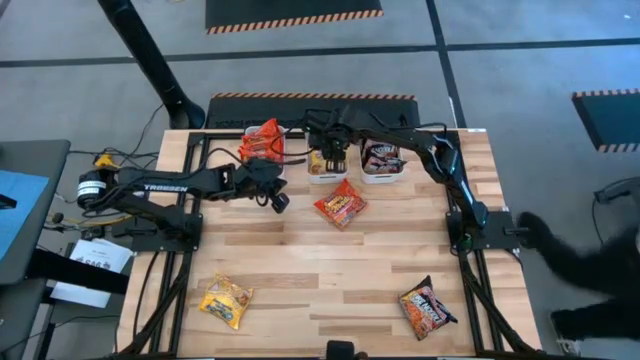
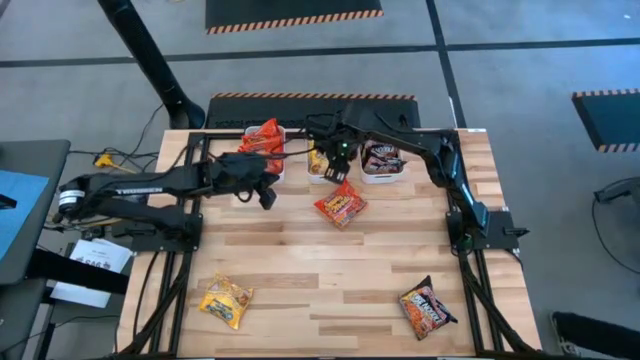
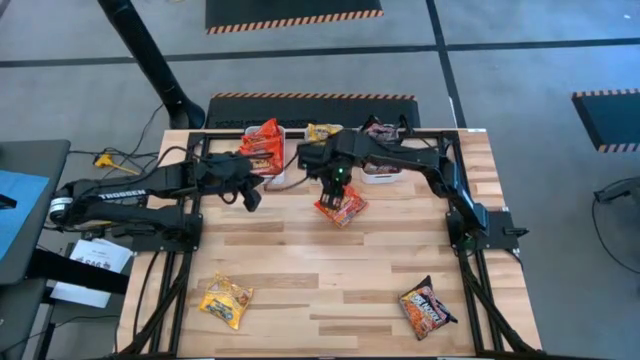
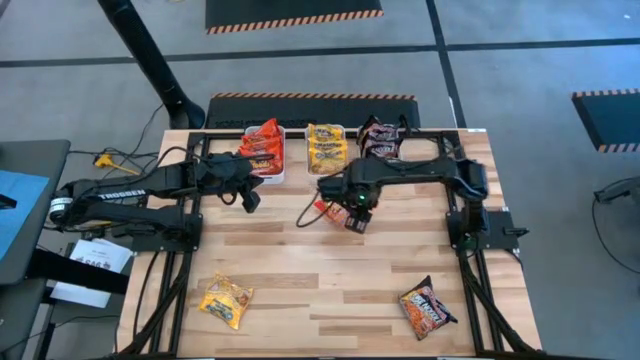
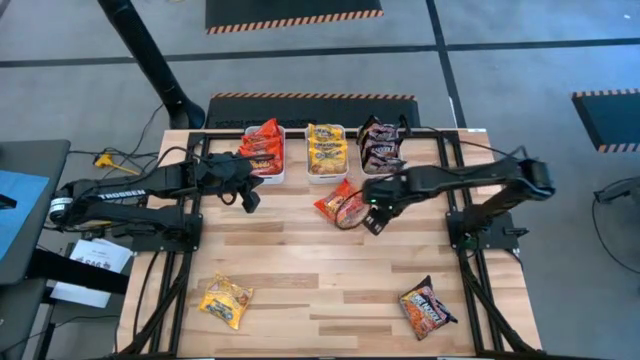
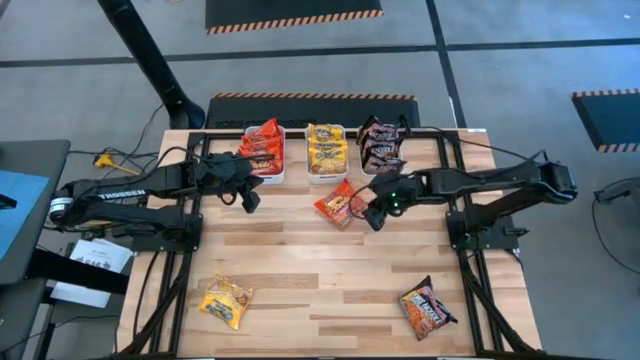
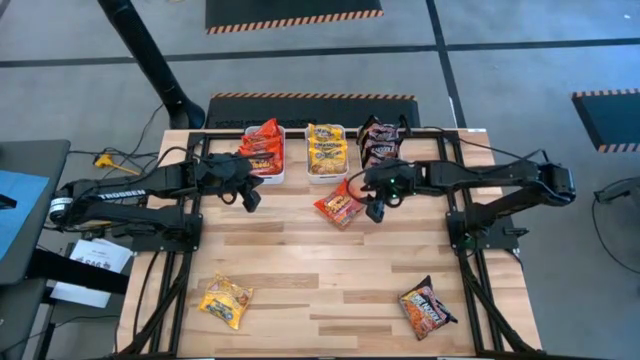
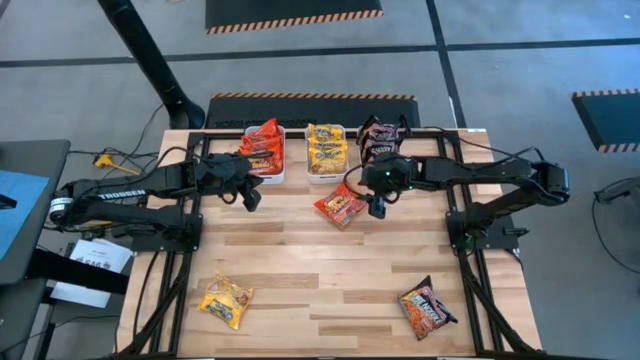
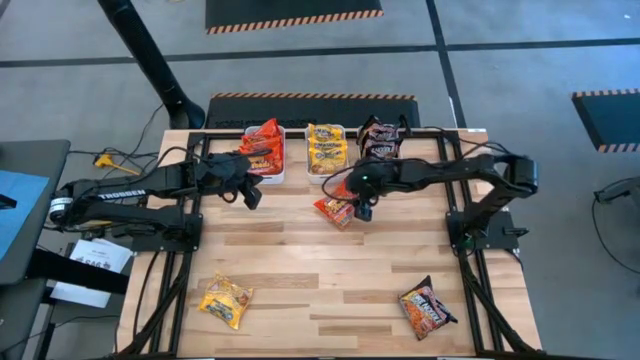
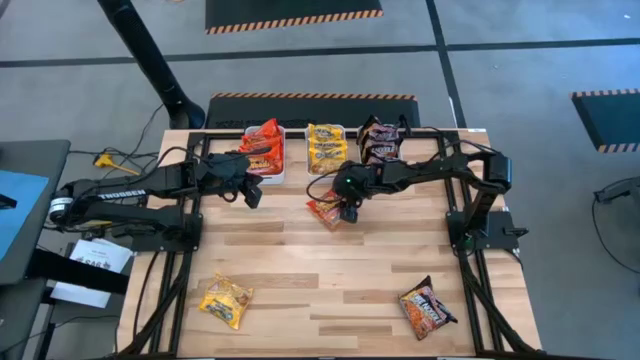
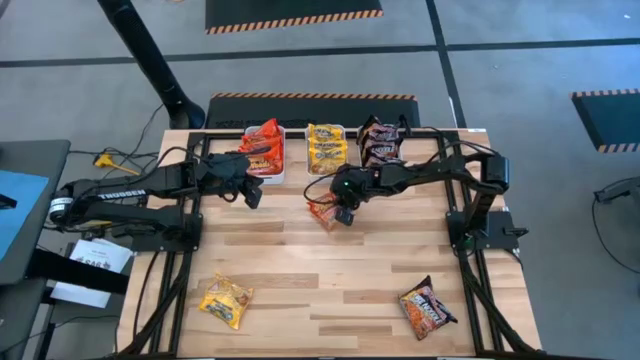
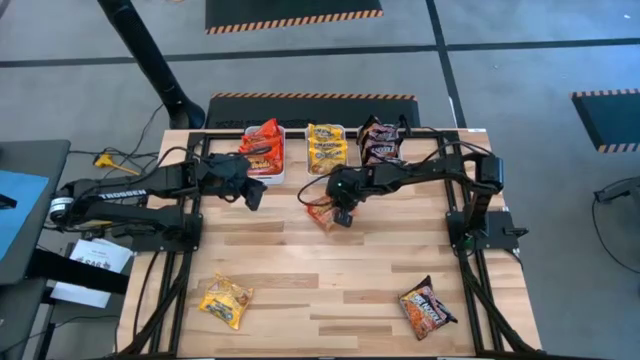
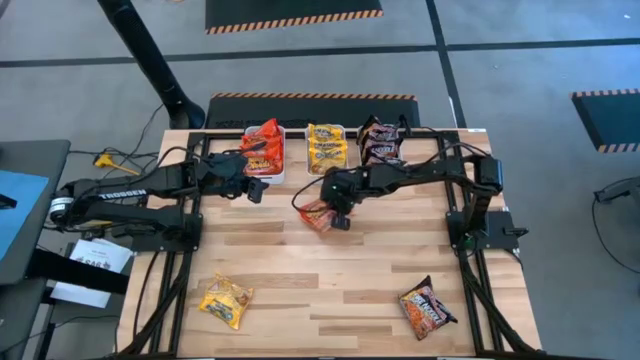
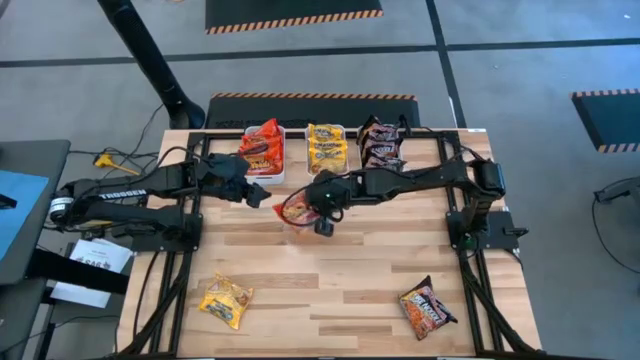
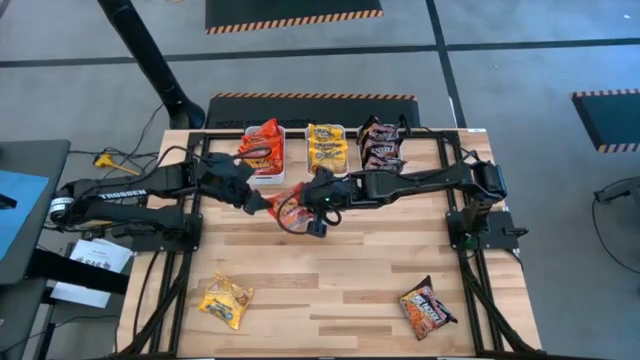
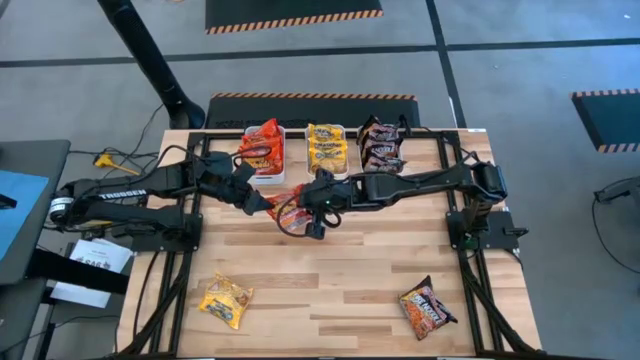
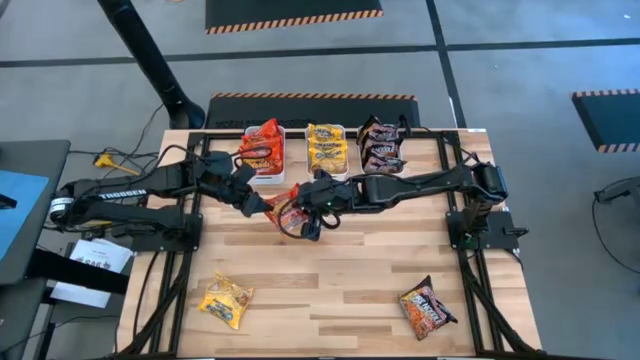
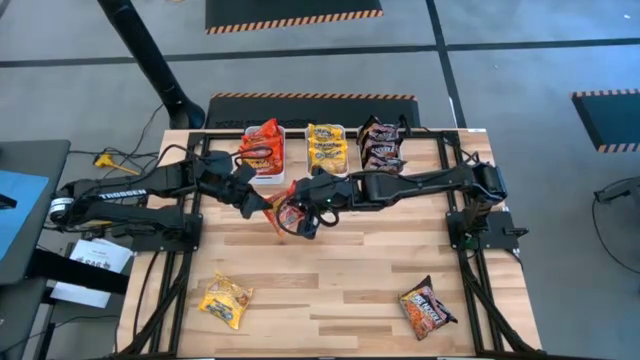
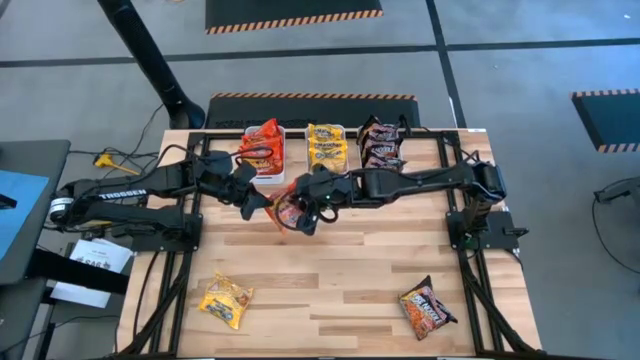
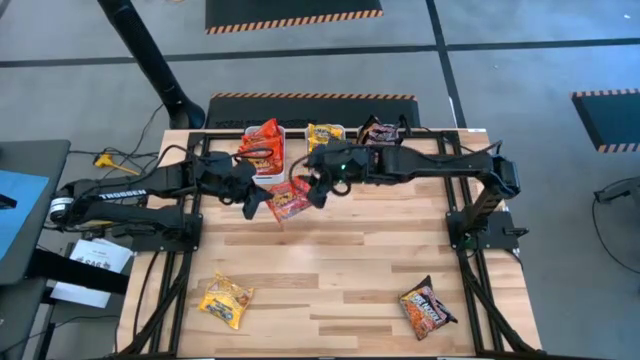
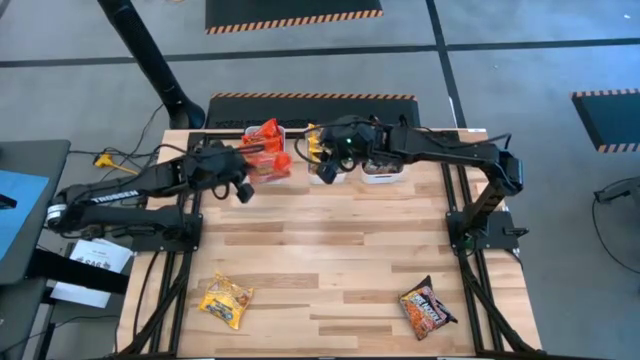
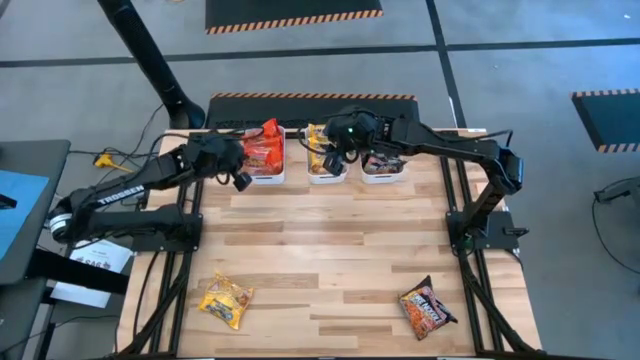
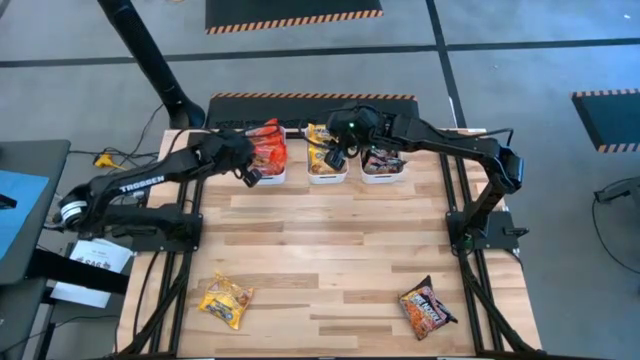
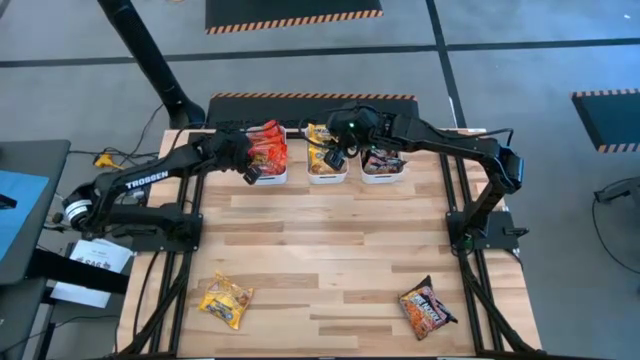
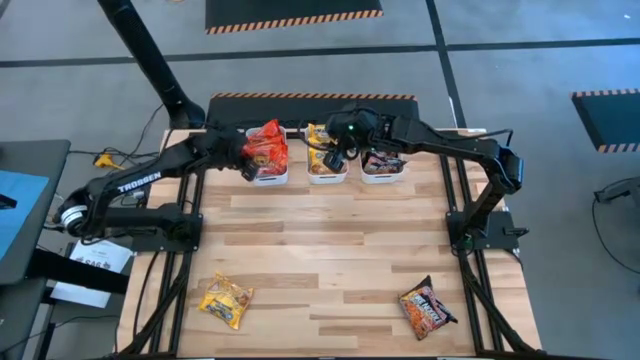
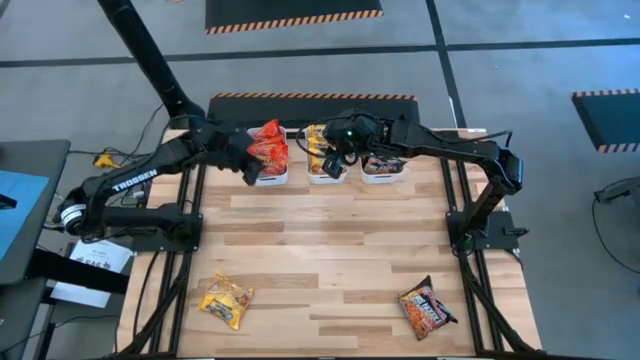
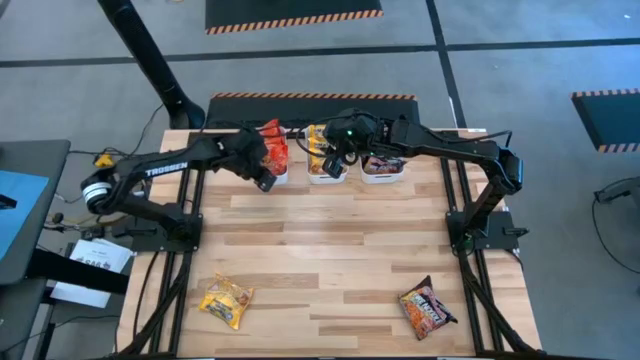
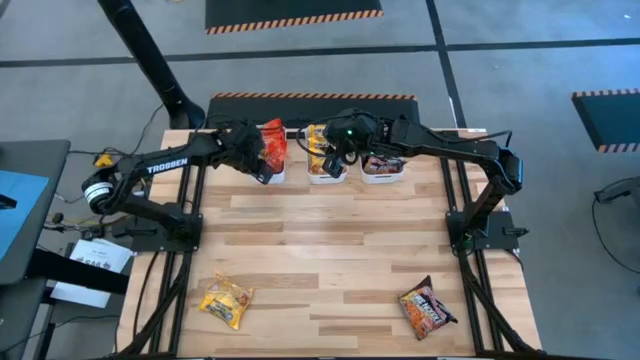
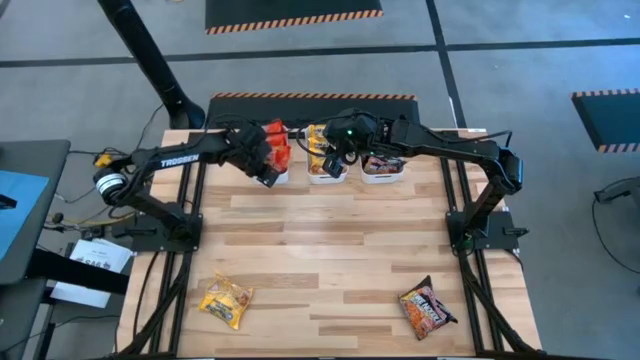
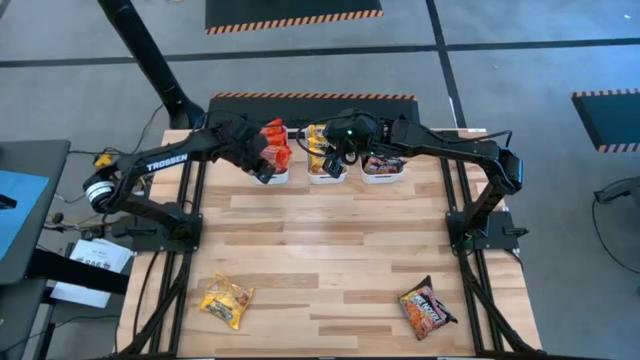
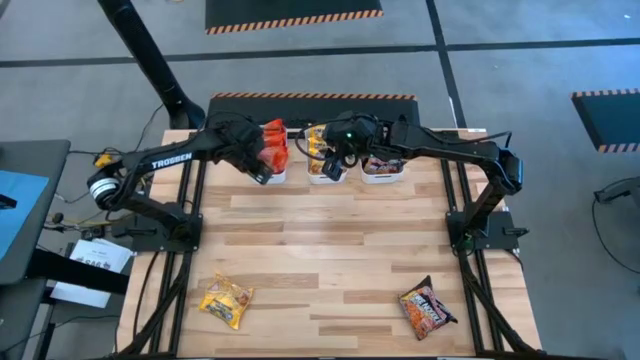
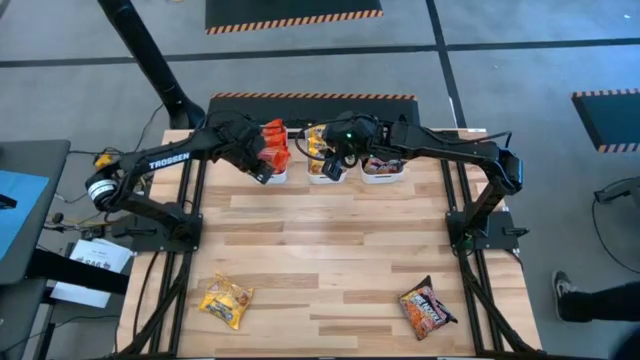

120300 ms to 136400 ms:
Task: Sort Maruchan noodles
Put the orange noodle pack into the left white bin

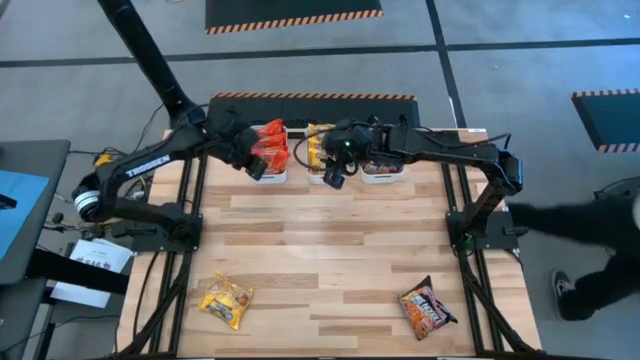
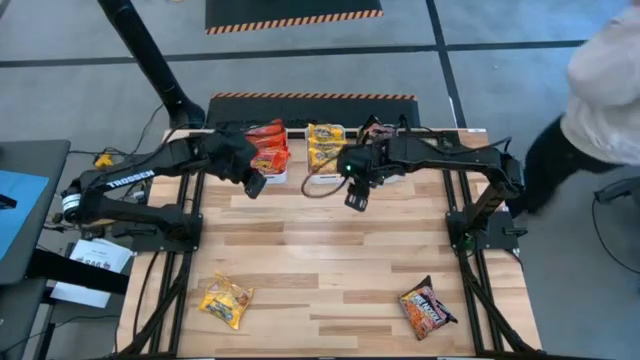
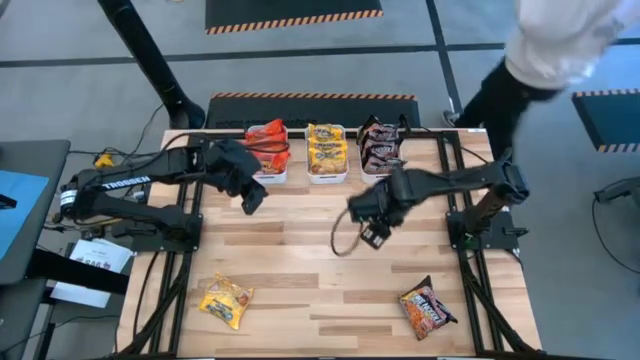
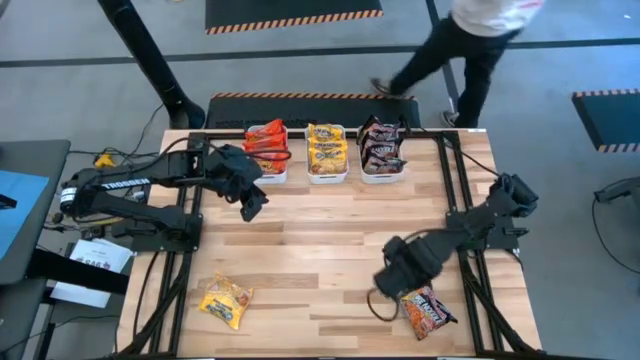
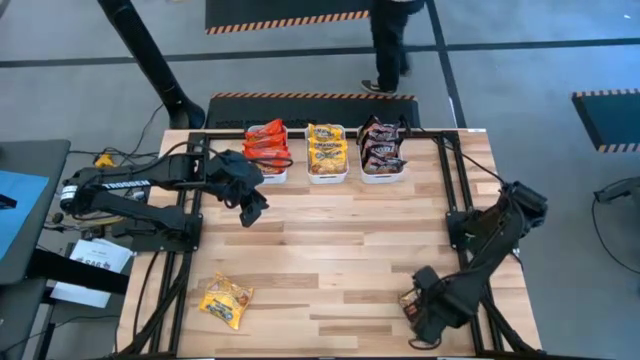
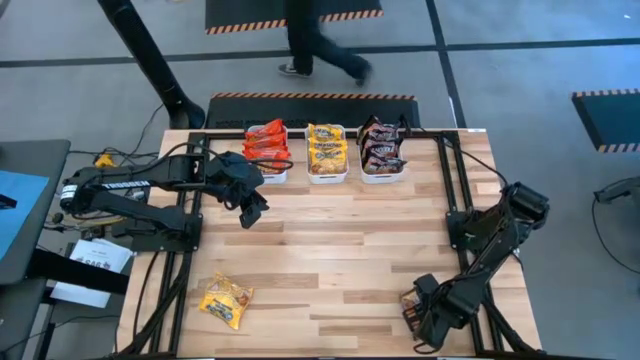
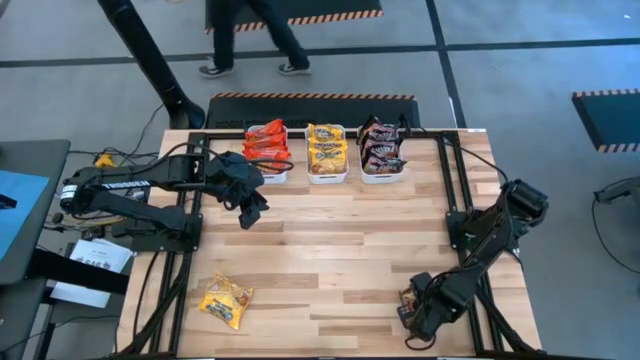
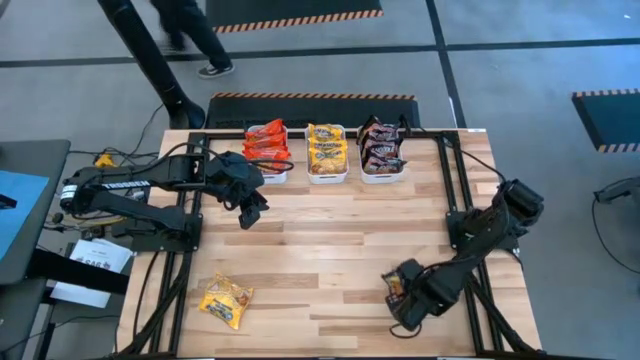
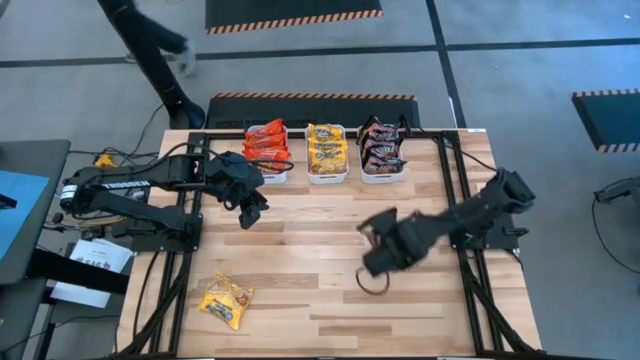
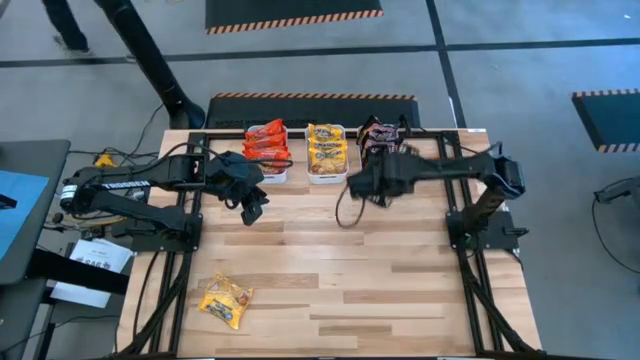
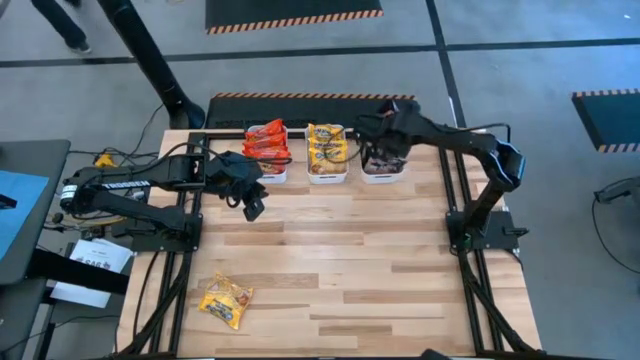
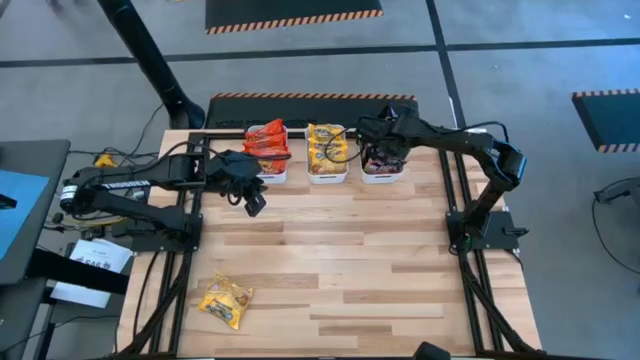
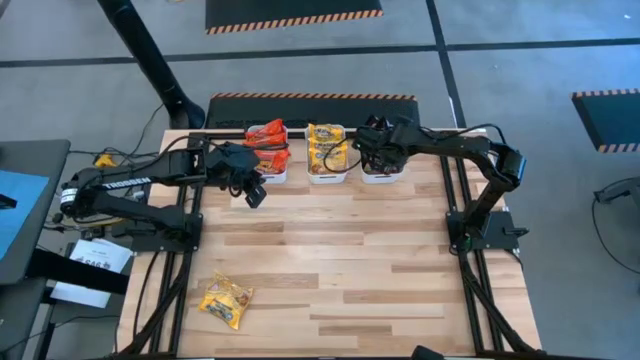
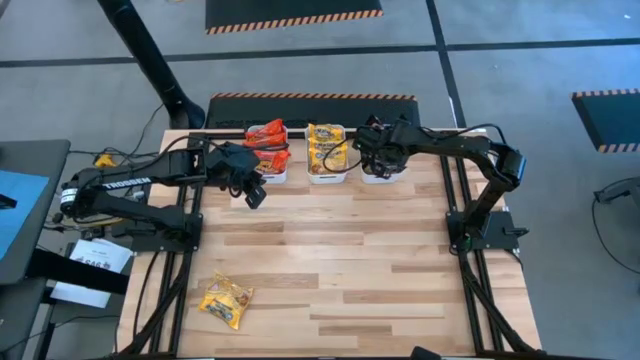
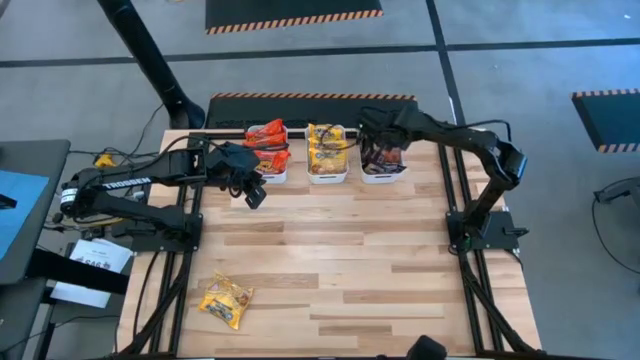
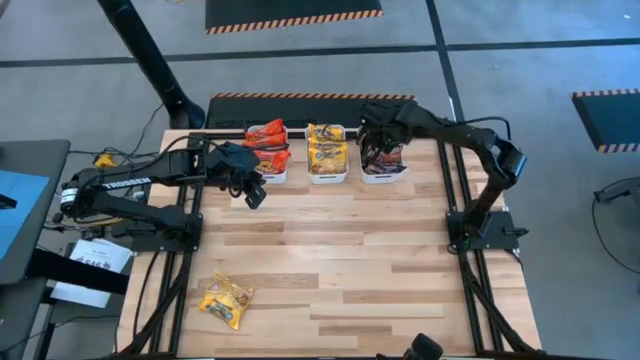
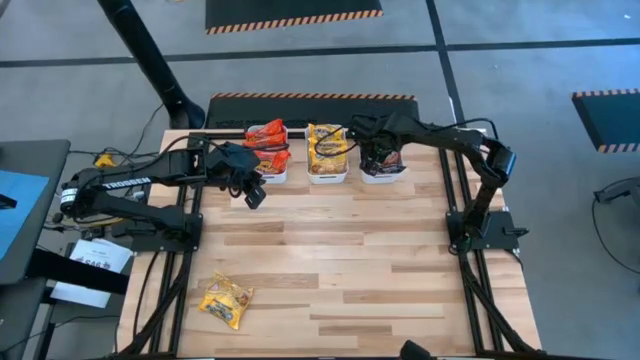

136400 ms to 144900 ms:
Put the black noodle pack into the right white bin
